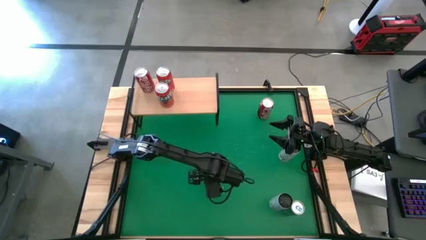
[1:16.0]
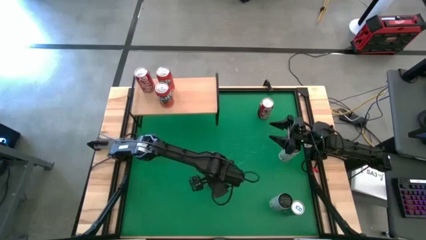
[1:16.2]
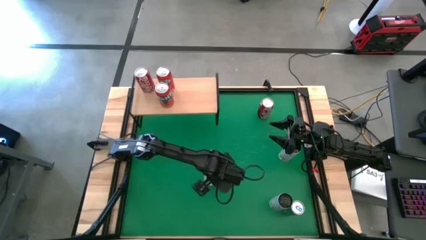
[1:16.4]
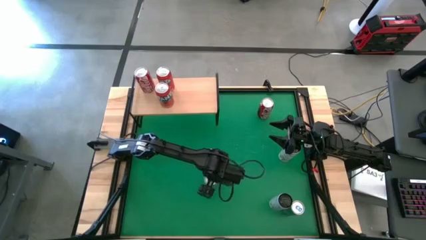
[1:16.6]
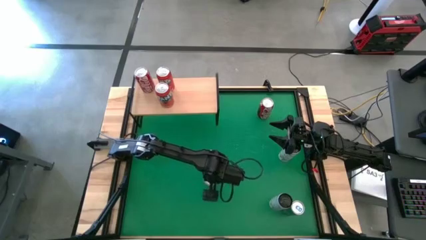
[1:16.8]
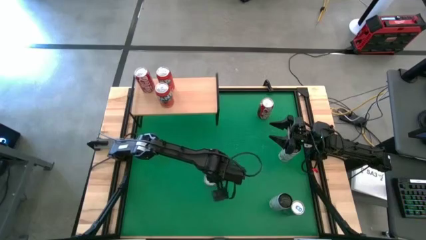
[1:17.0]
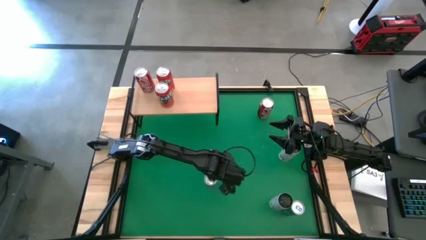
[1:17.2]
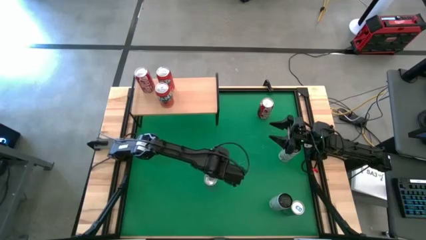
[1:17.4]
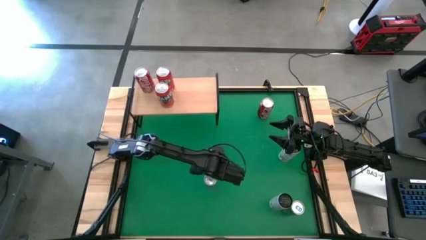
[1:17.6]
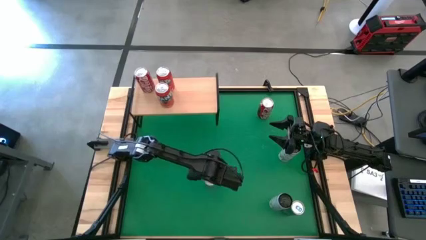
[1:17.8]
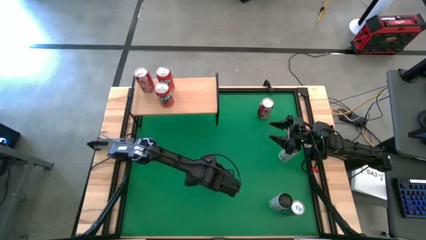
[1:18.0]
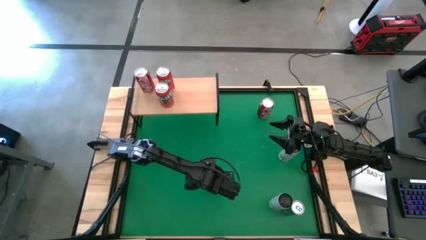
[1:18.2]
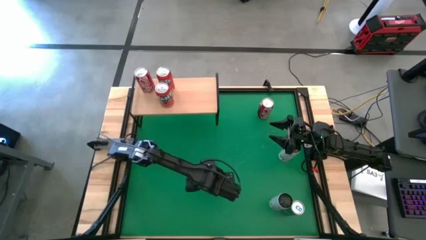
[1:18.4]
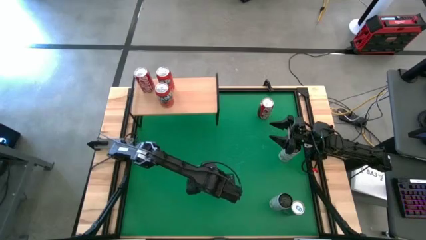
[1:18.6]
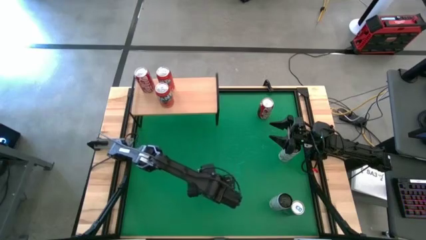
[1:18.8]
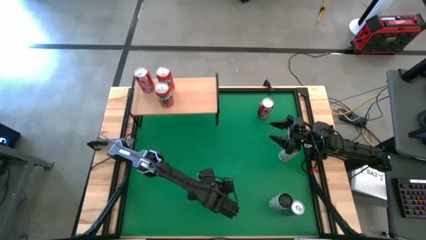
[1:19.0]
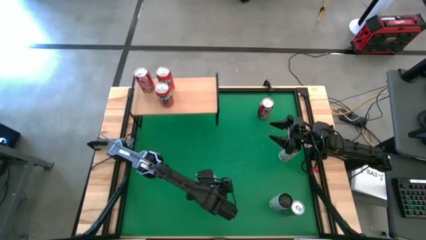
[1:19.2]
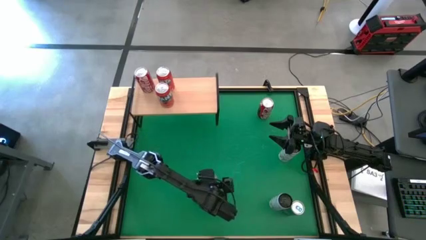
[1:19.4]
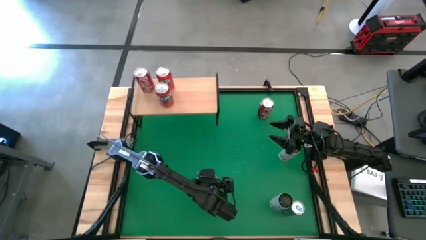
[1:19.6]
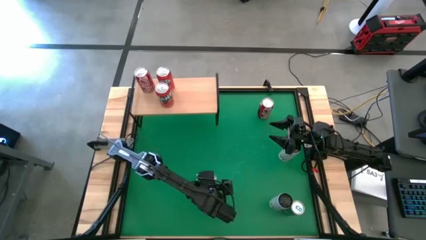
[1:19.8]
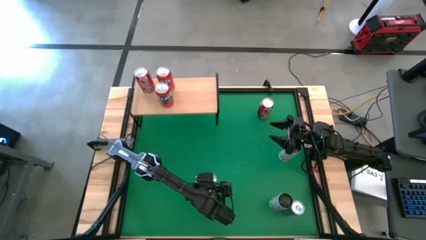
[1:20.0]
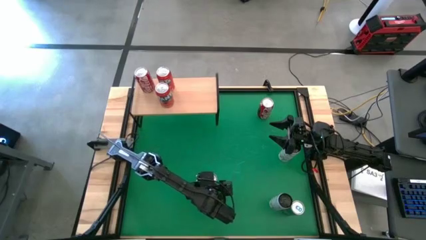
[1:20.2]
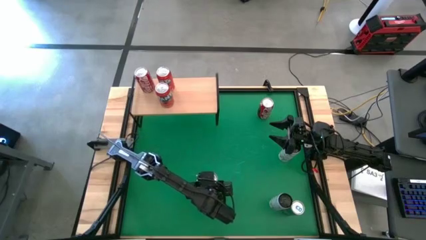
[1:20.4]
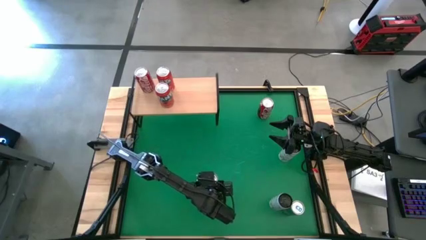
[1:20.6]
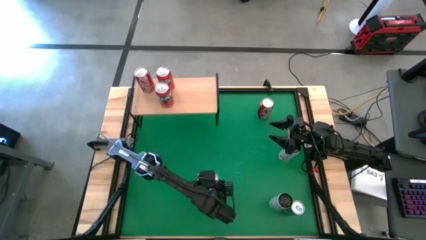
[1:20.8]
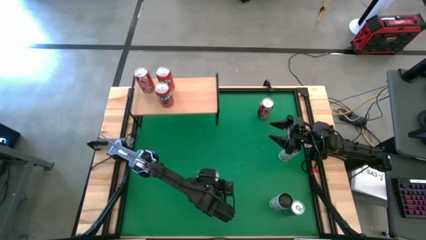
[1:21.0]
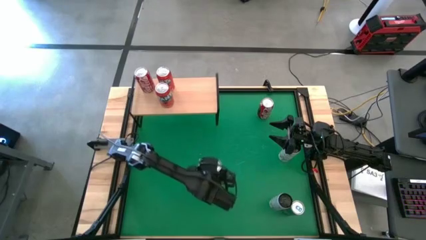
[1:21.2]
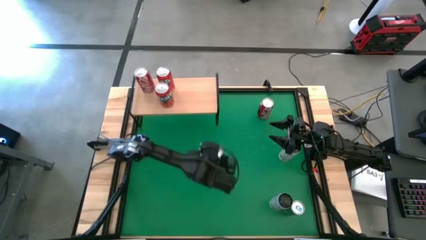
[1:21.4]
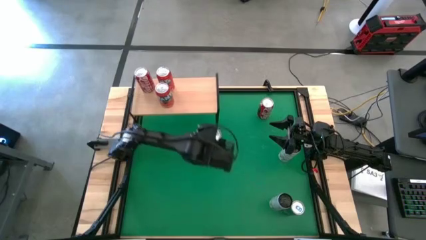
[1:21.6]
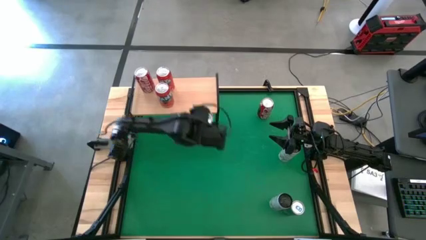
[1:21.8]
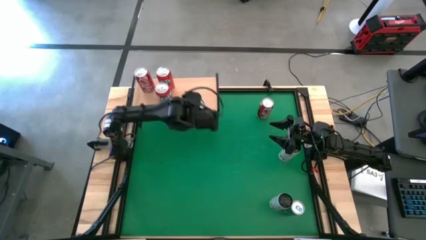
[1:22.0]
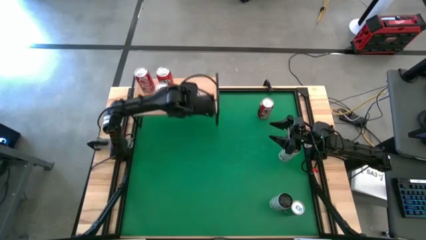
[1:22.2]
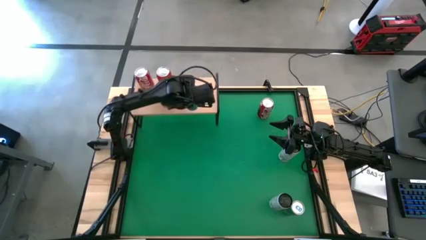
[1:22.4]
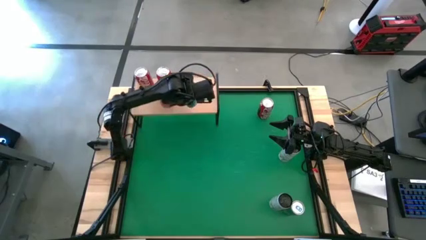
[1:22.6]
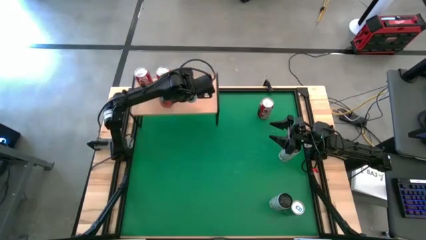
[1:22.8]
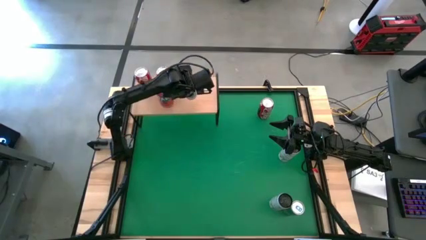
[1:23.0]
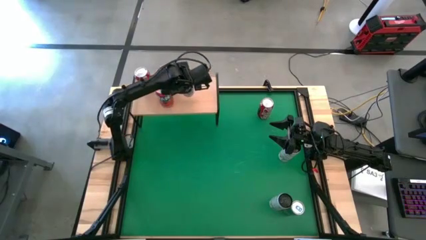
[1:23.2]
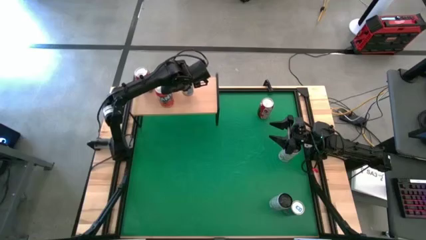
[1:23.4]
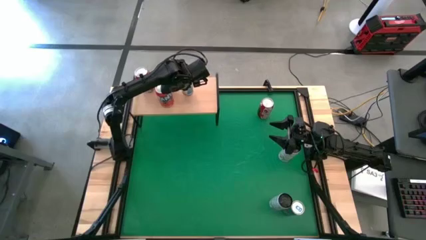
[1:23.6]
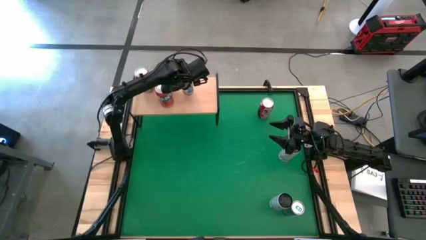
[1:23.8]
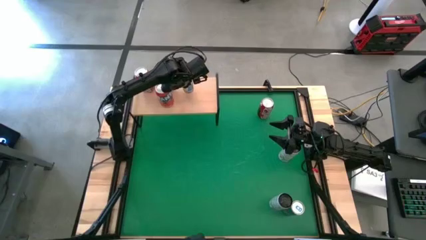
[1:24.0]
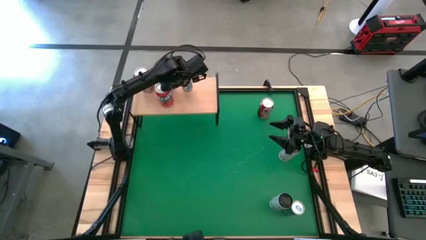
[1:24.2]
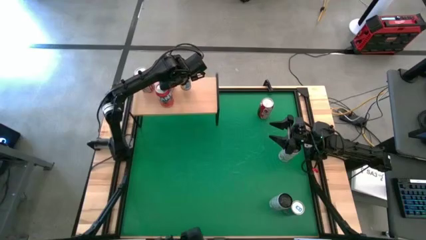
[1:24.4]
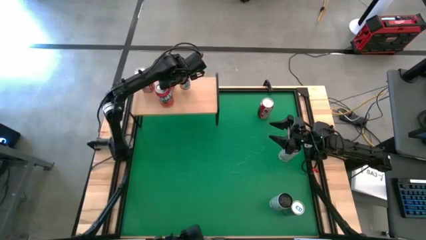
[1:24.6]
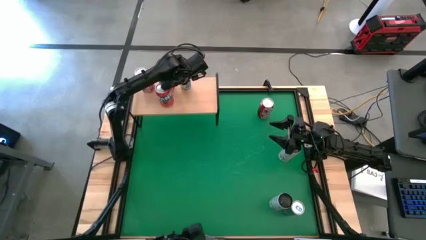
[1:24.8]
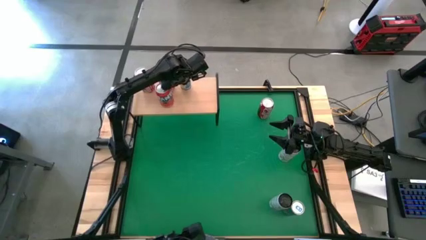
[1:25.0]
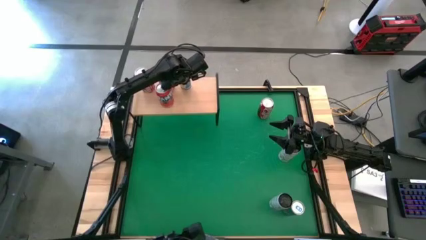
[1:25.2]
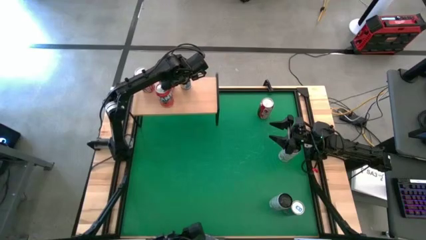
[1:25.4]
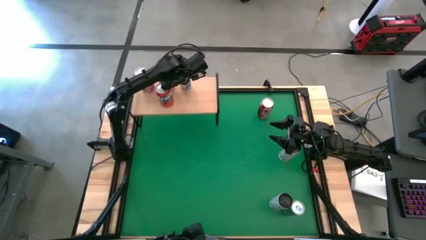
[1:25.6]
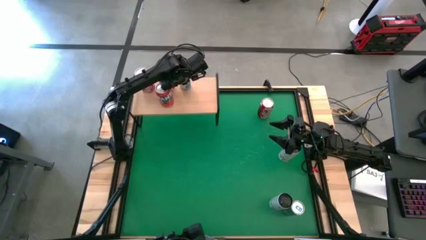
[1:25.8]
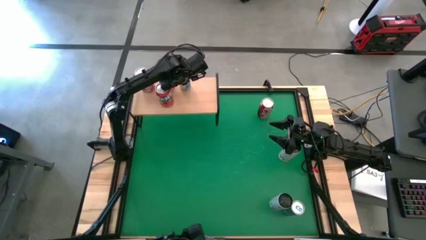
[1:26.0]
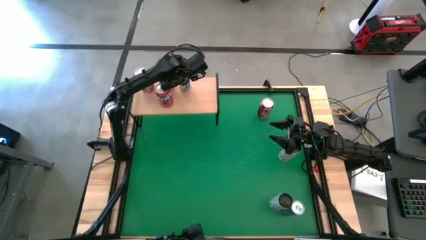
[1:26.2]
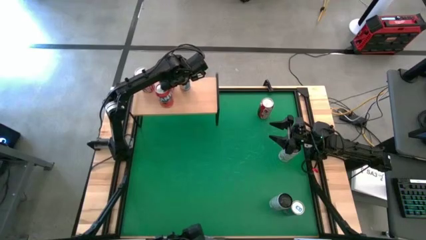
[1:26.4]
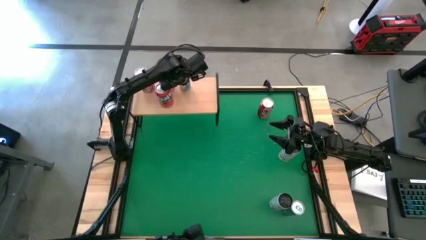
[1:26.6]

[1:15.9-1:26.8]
Task: Place canned beverage on shelf
Put the left blue soda can on the shelf

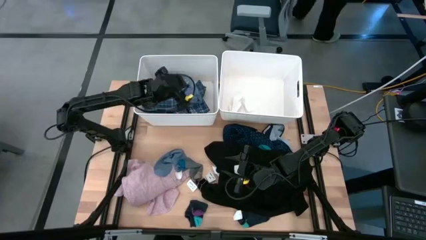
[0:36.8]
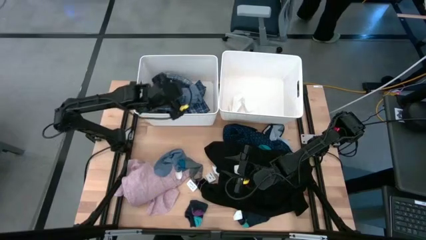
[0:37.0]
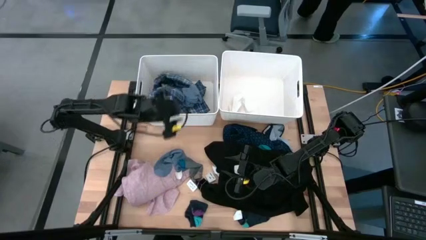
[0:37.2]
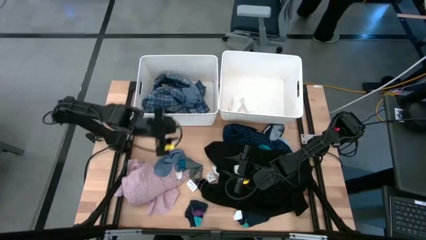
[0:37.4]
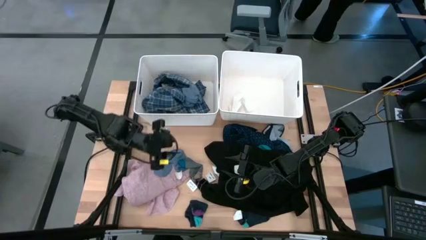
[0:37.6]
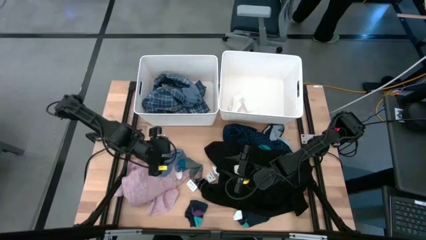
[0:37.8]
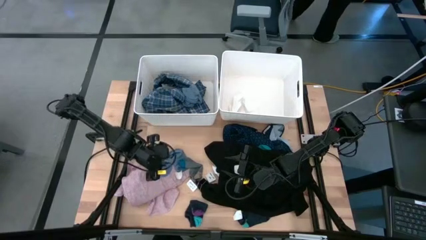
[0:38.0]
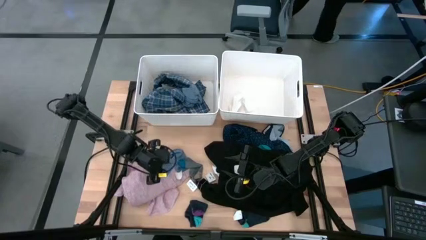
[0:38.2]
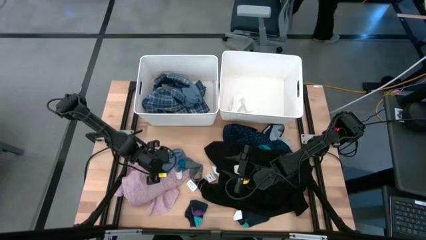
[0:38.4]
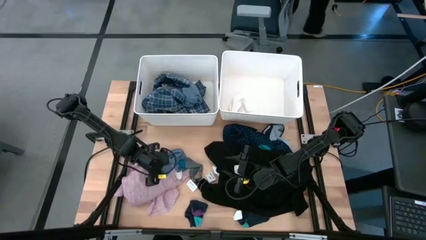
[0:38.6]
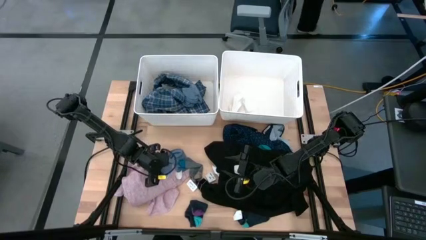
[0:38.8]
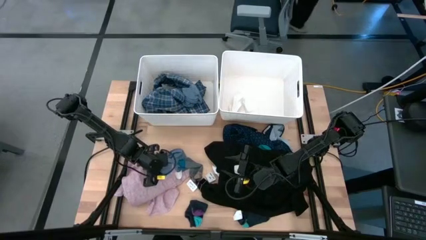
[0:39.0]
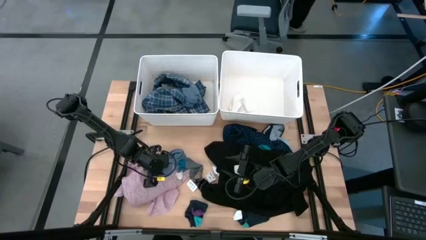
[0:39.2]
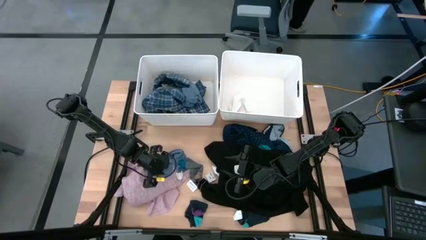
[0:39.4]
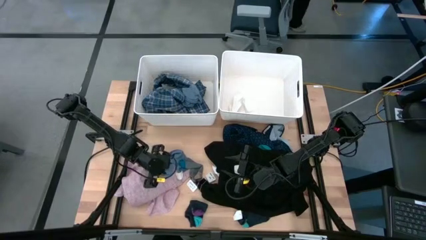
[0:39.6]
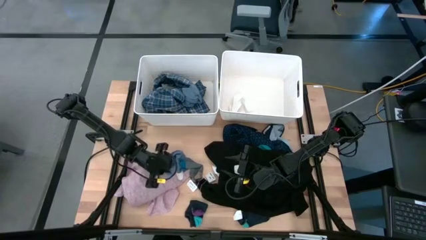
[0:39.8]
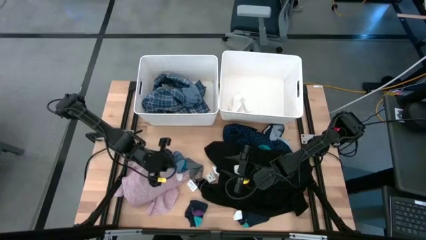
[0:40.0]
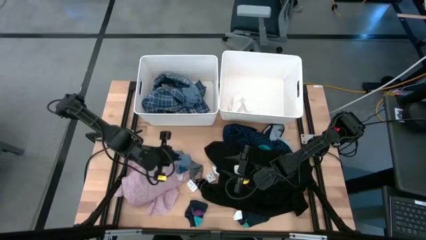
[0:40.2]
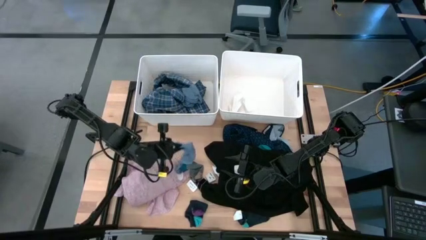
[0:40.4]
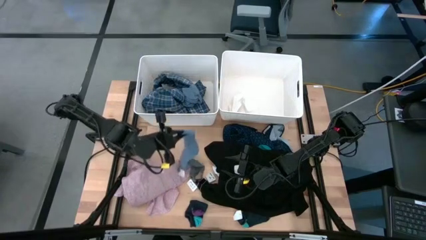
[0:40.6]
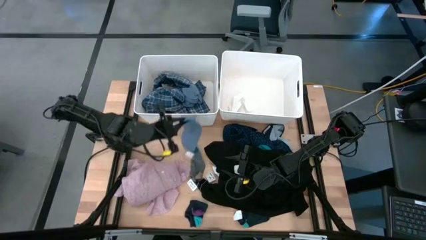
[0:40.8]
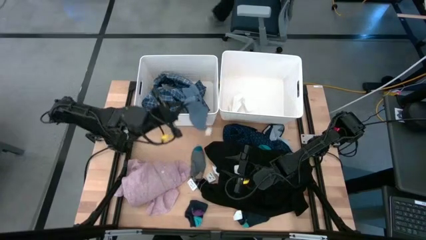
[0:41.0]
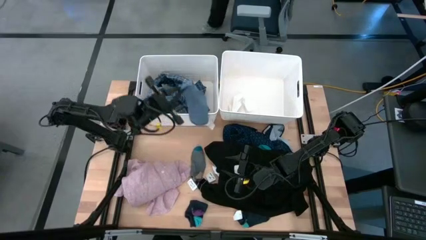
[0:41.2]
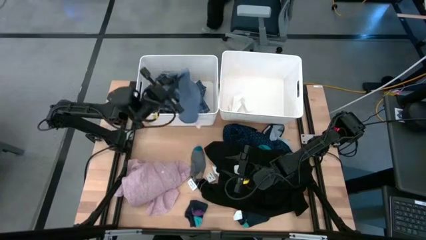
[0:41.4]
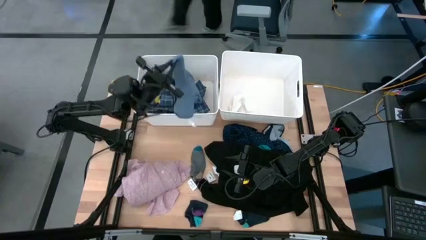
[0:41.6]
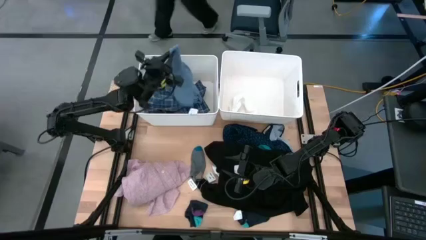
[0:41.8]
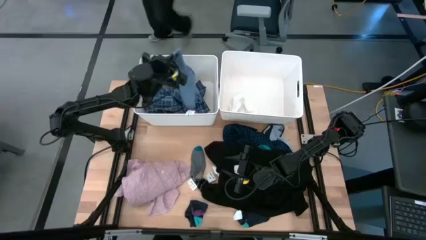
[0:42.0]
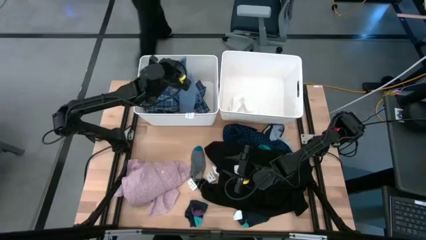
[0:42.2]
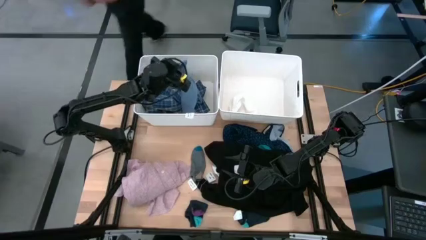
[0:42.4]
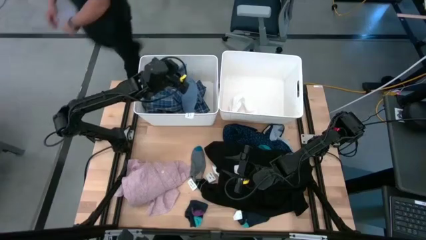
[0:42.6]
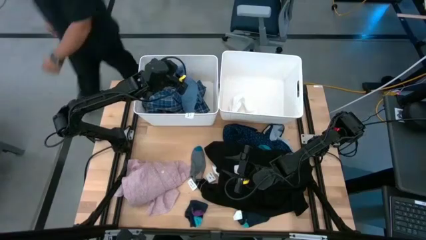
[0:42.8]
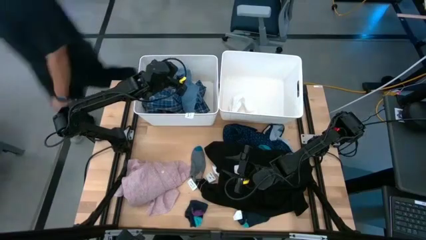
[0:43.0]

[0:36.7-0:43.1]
Task: Sort clothes
Put the blue sock into the left white bin
